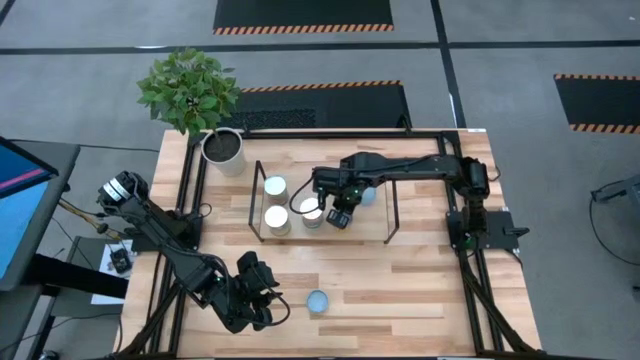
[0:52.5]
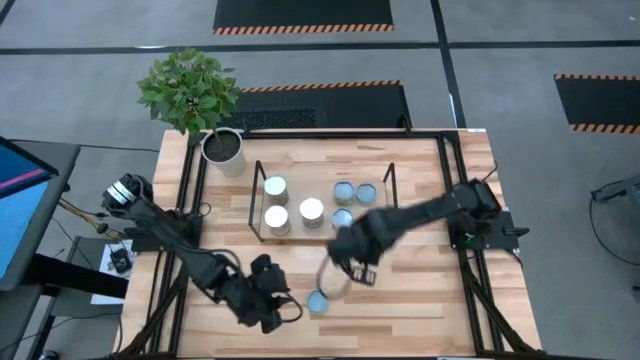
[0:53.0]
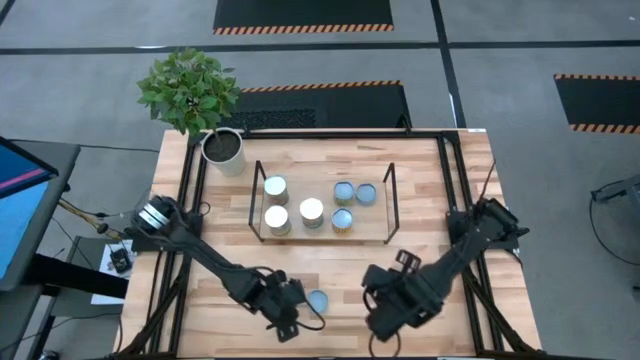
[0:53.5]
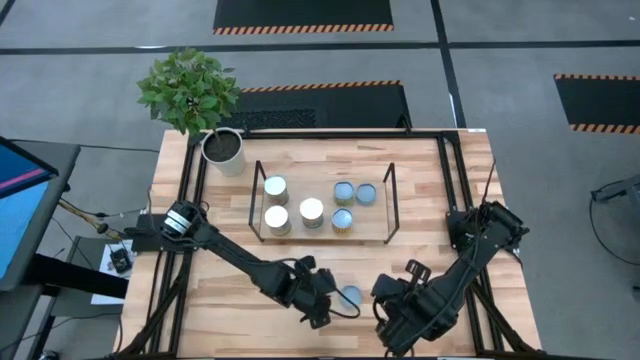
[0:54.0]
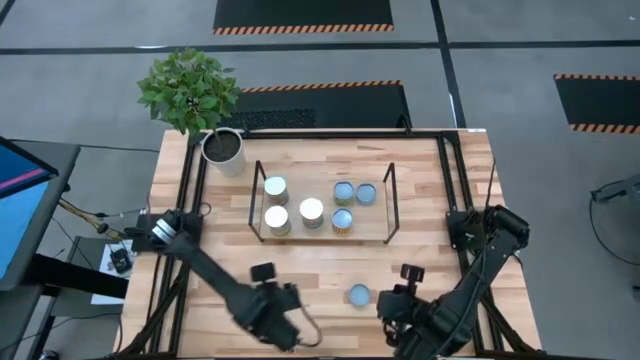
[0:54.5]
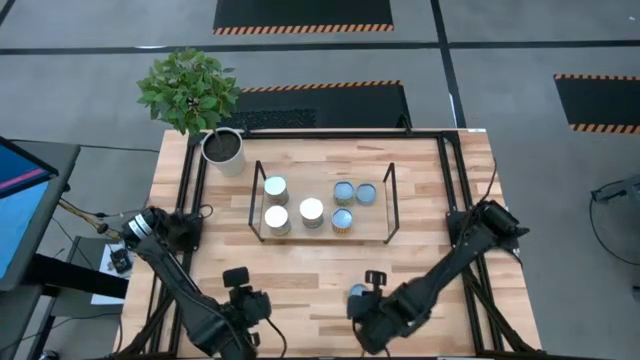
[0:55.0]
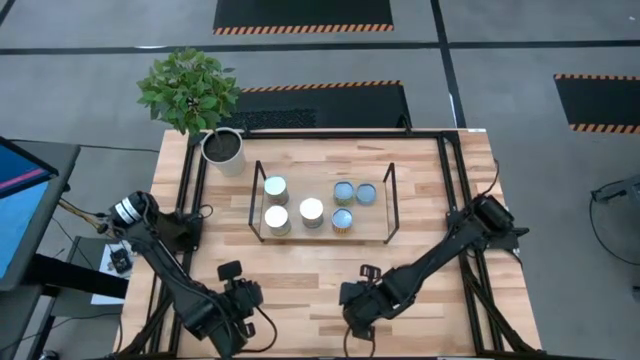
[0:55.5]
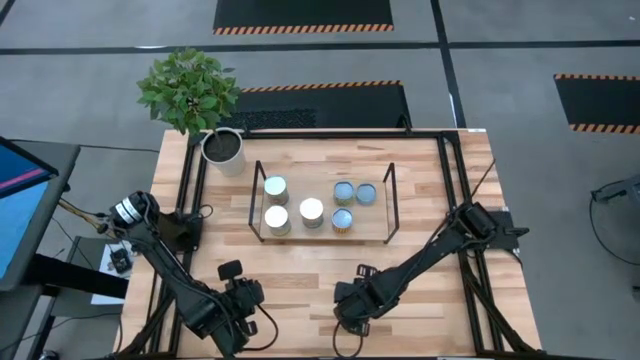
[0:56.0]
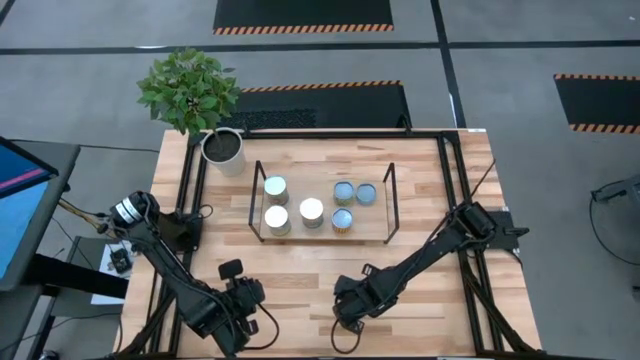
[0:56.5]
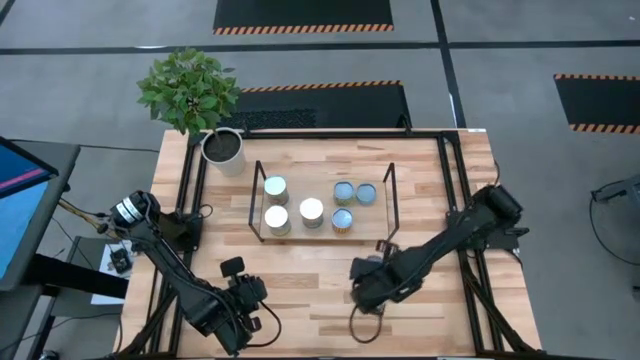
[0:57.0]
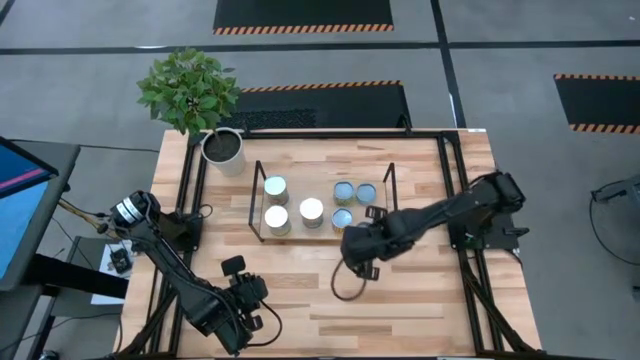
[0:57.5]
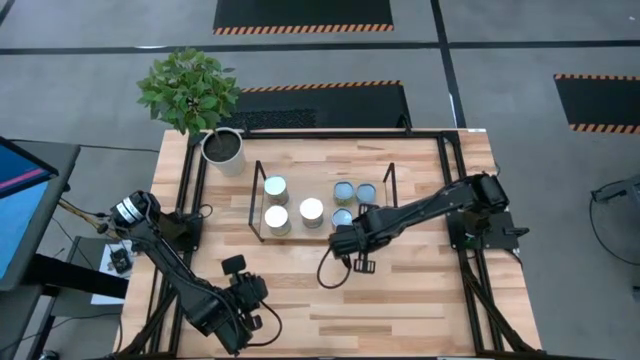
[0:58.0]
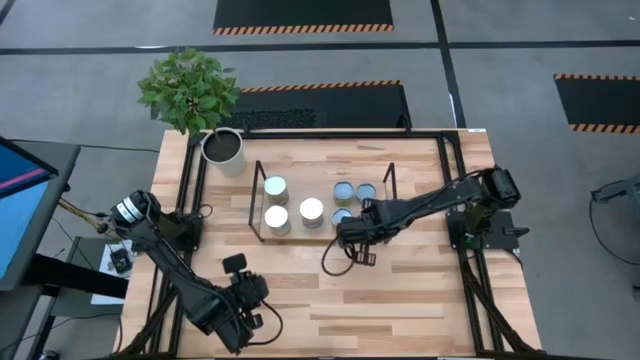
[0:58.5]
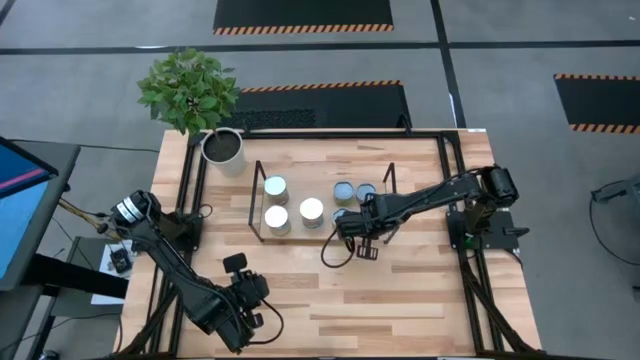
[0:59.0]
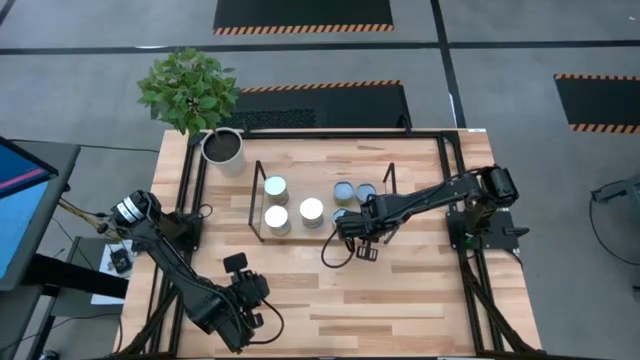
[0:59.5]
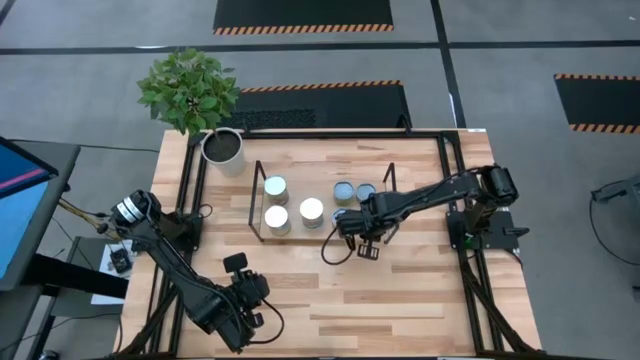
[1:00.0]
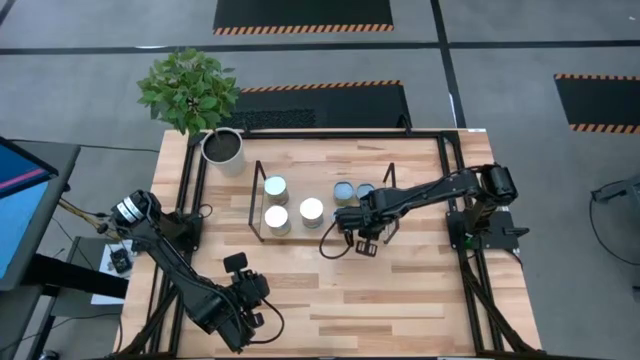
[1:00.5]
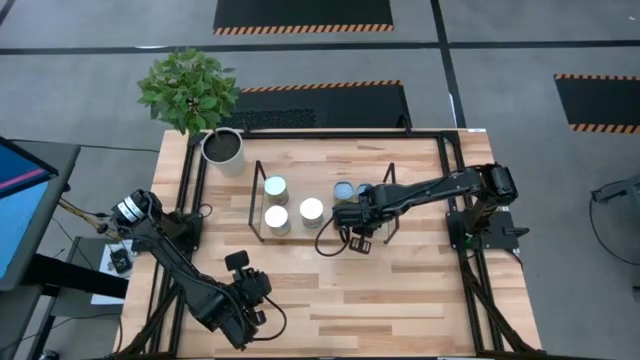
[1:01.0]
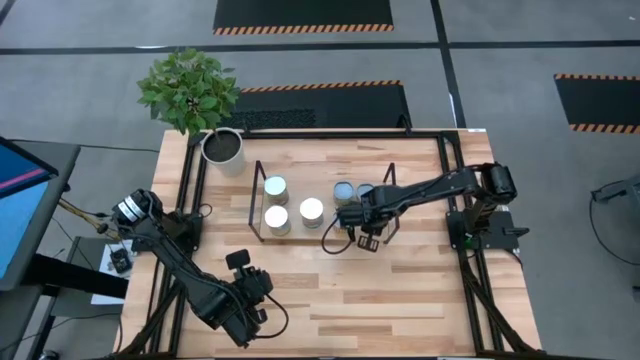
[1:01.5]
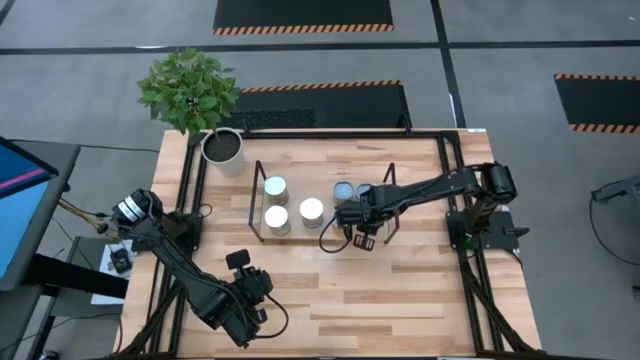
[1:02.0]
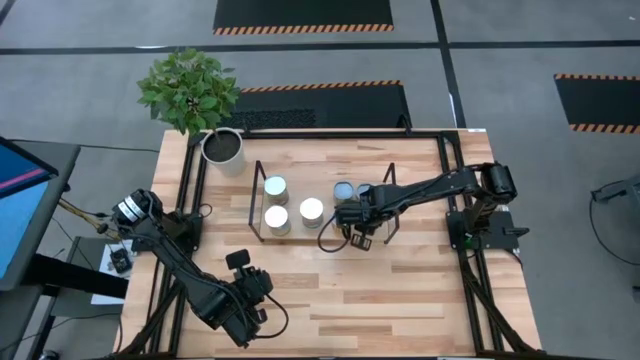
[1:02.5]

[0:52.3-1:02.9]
Task: Pick and place cans onto a shelf
Put the canned mushroom on the shelf

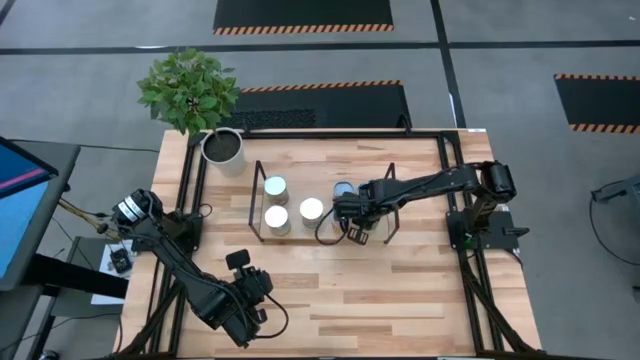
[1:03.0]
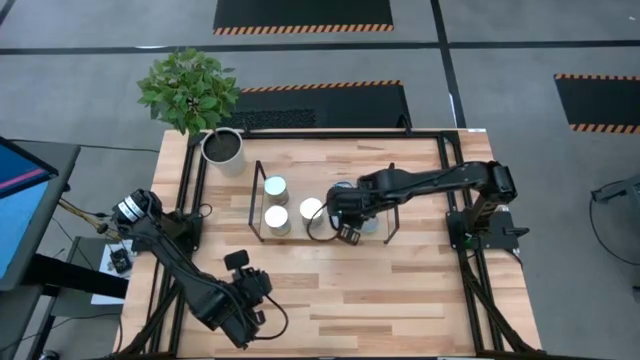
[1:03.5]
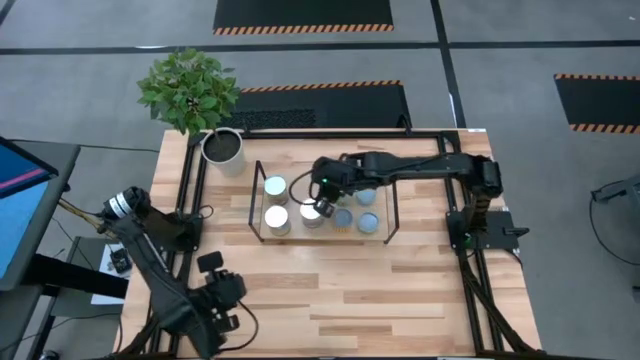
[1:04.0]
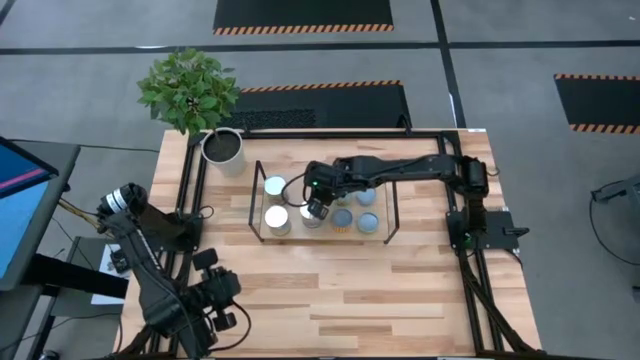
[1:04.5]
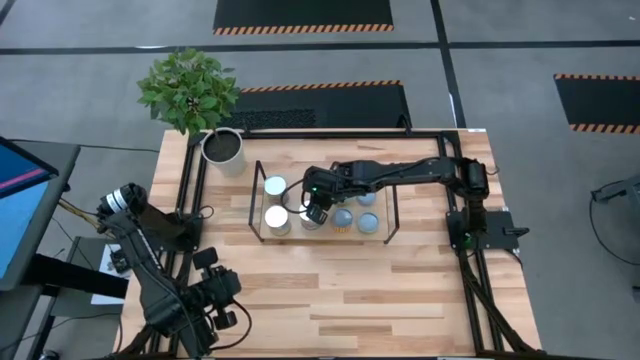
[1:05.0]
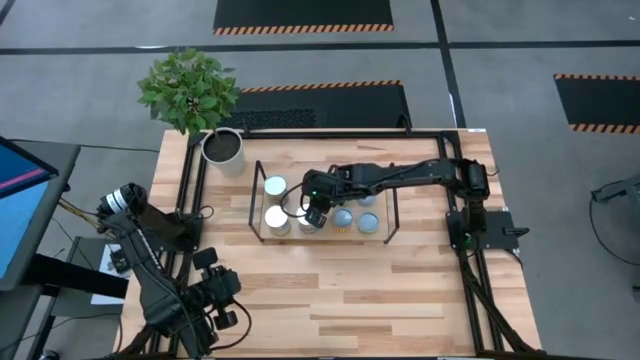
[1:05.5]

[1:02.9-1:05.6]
Adjust the canned tomatoes on the shelf

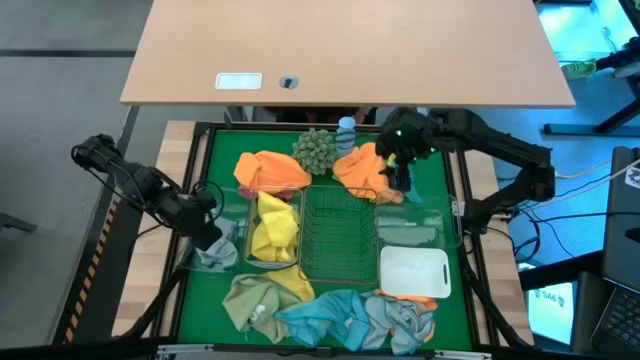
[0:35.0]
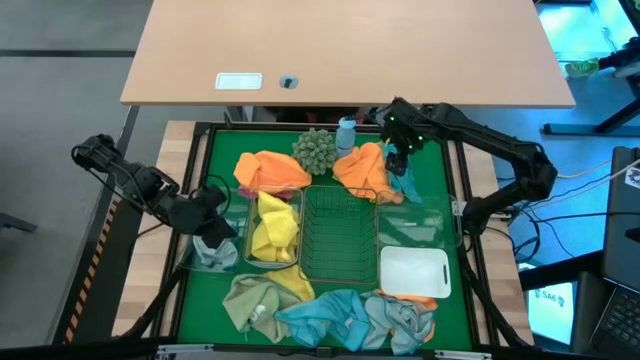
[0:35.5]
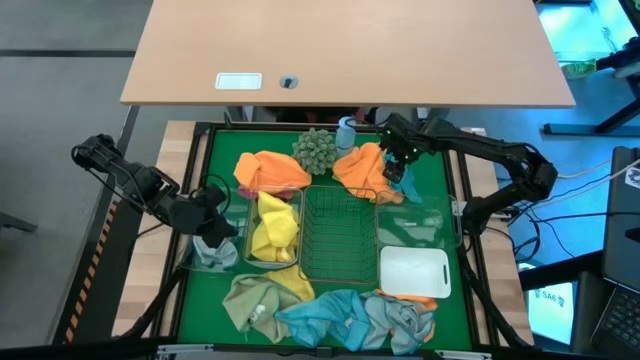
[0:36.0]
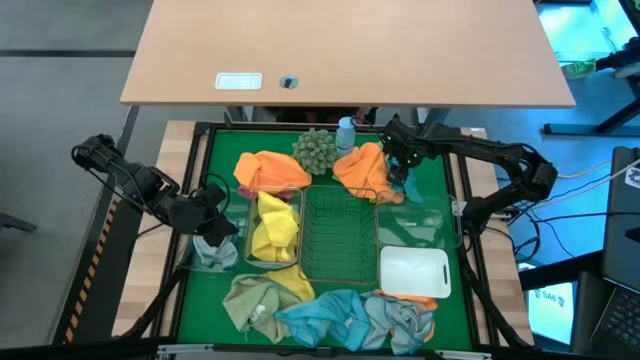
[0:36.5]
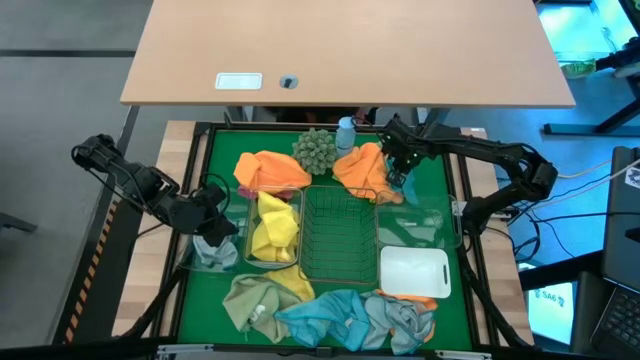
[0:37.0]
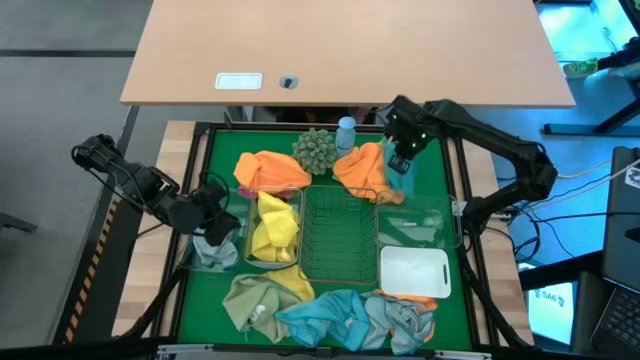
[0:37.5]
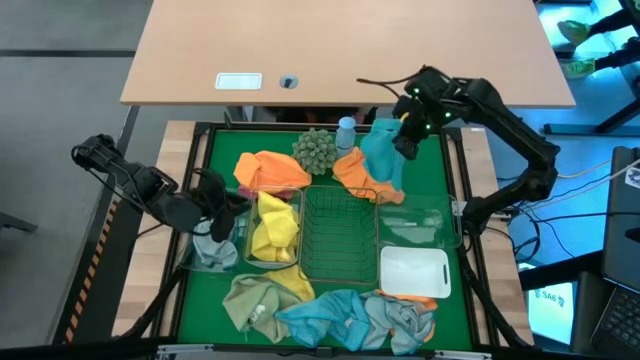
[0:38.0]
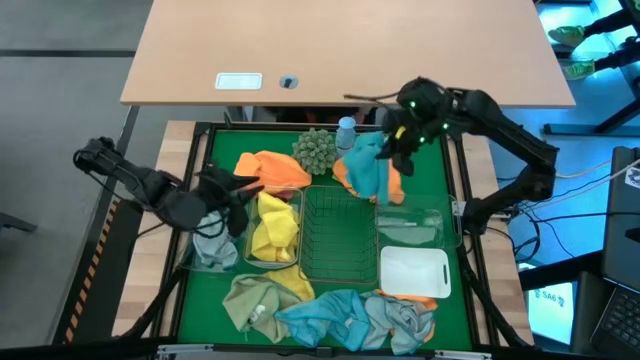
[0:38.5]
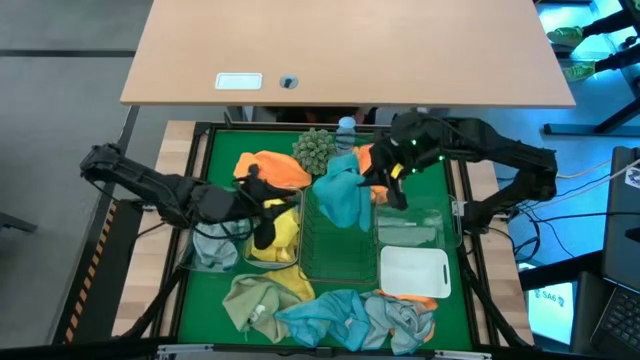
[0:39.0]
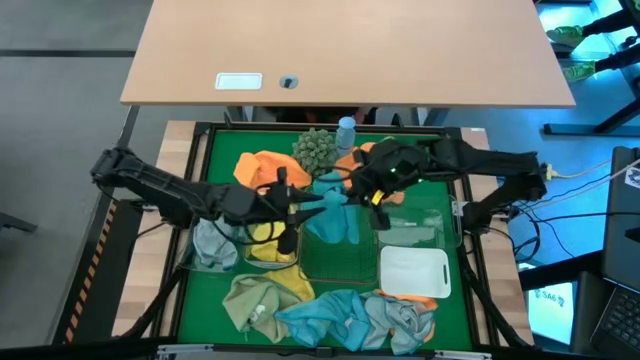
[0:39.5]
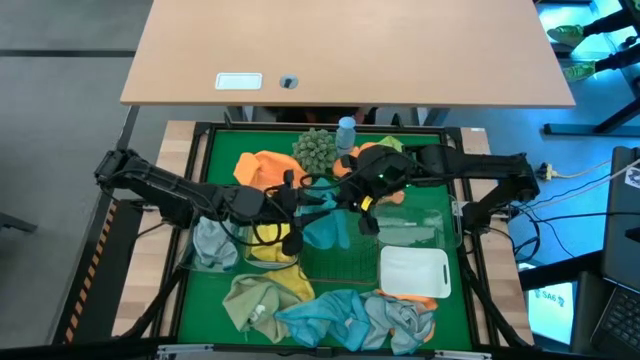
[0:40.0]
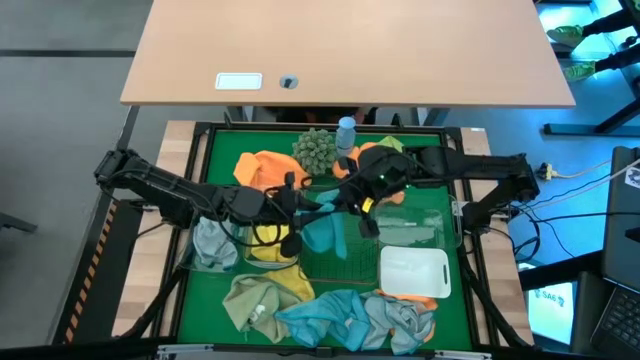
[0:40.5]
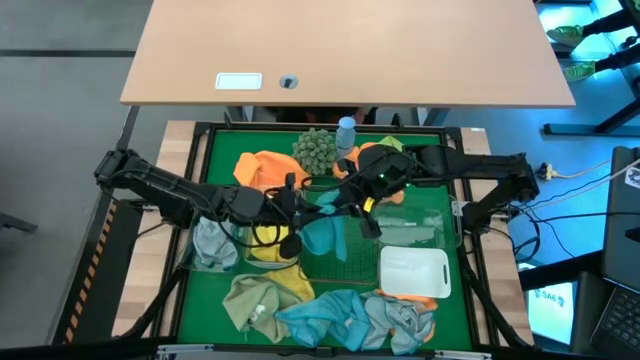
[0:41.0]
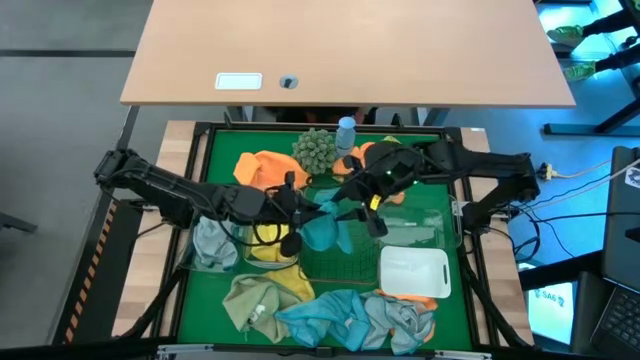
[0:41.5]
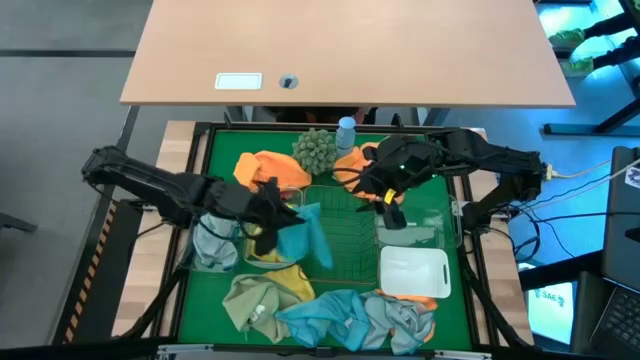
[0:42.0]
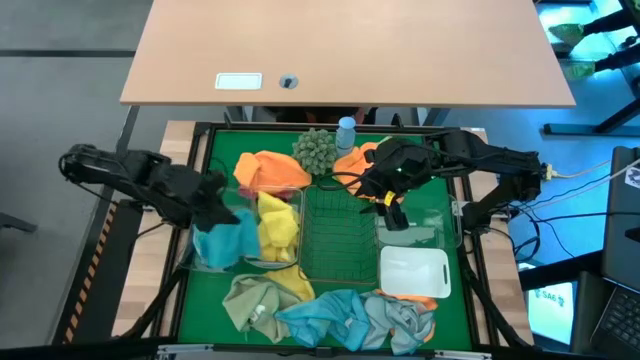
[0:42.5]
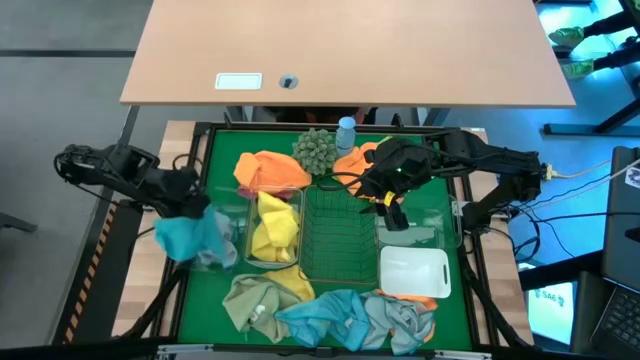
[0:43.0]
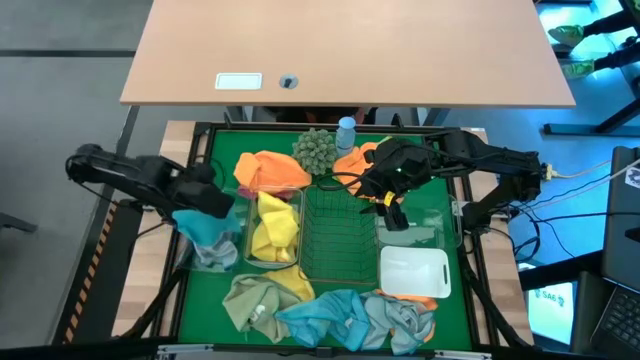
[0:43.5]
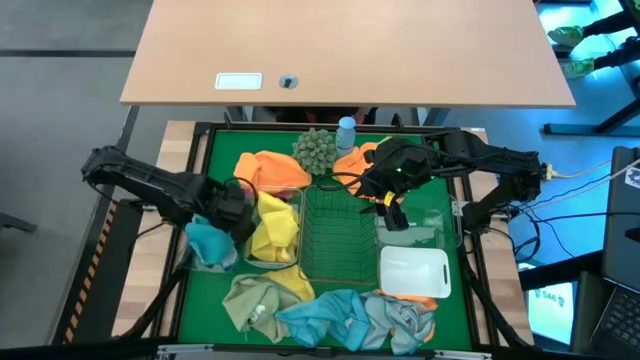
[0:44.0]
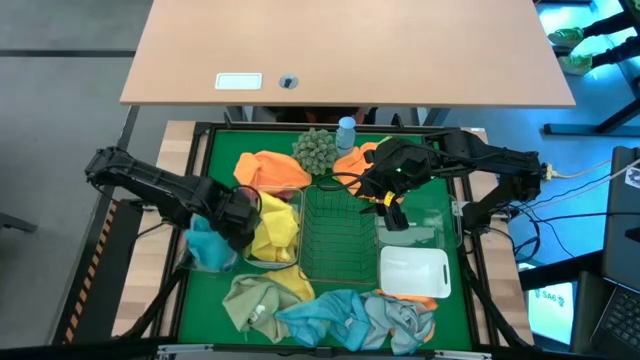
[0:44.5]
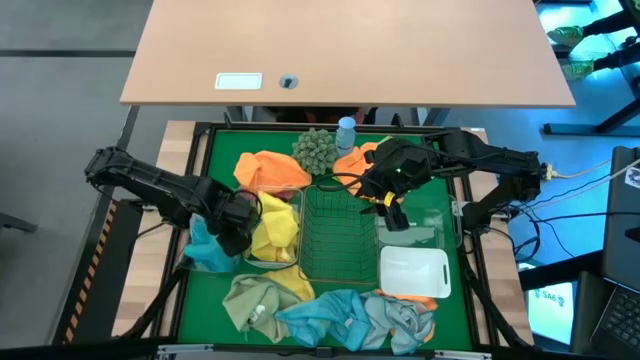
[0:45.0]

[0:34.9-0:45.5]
Task: Sort microfiber towel by color & place in baskets
Put the top right blue towel into the left transparent bin
